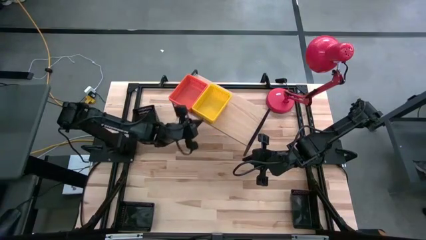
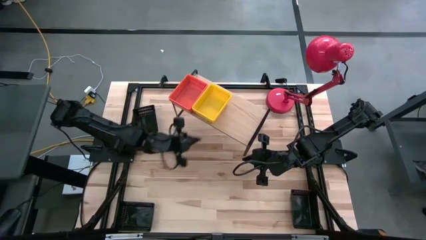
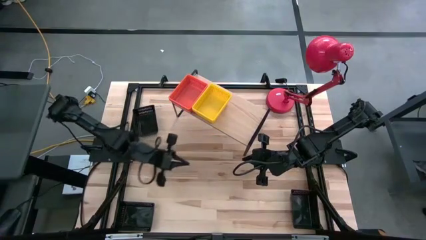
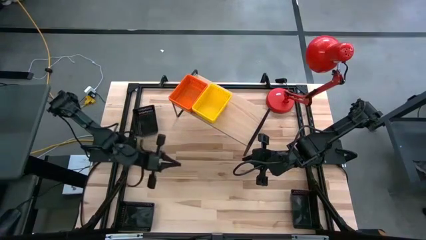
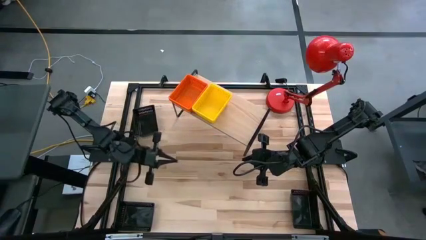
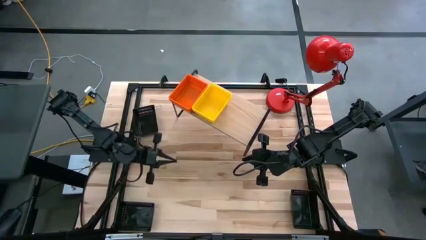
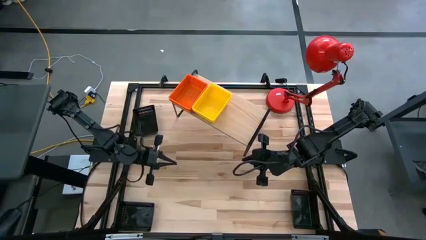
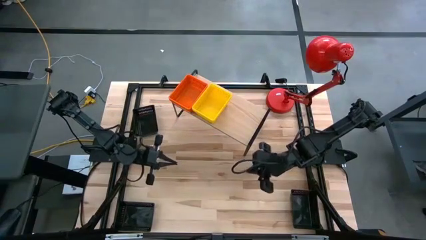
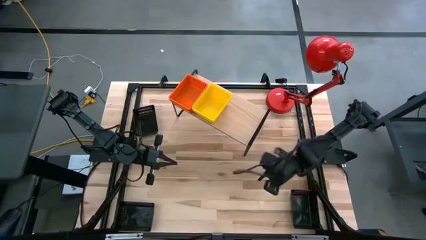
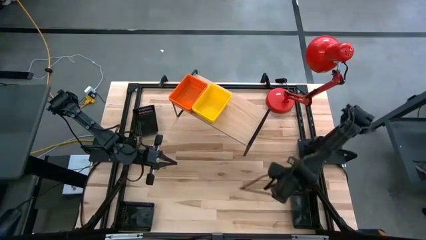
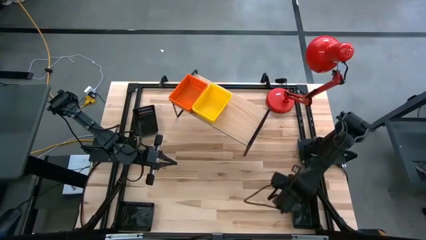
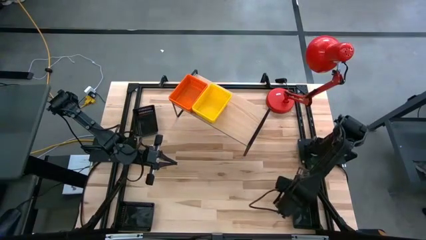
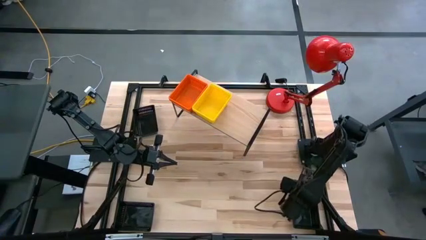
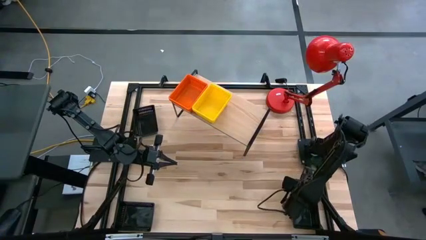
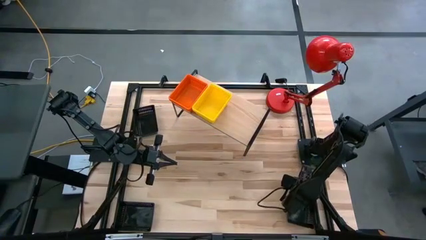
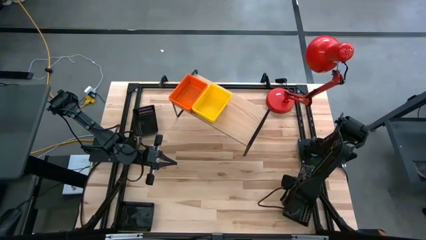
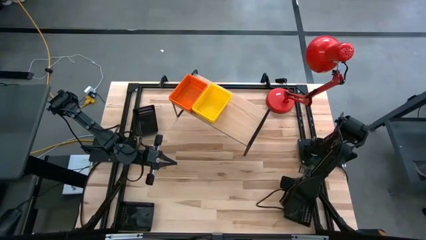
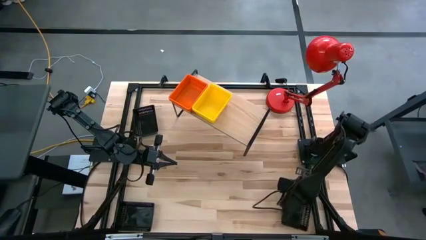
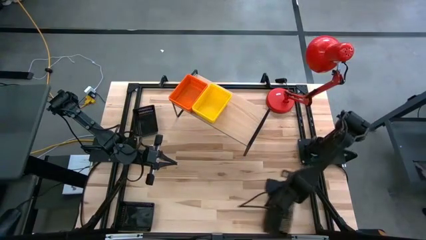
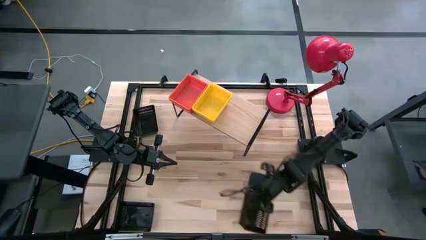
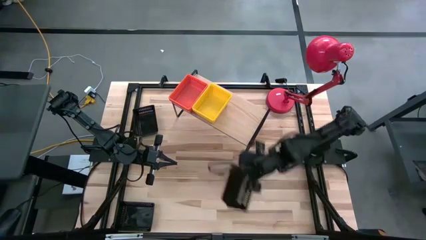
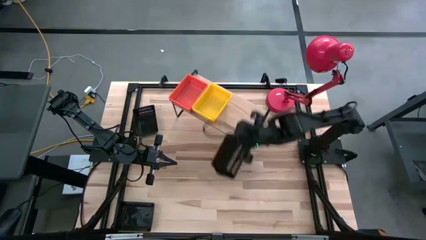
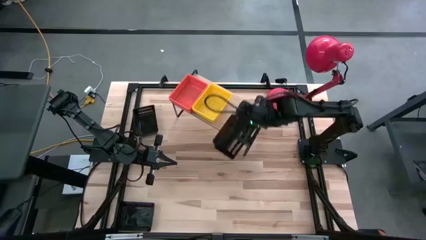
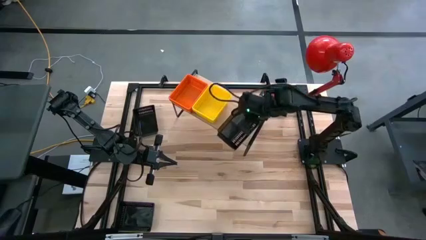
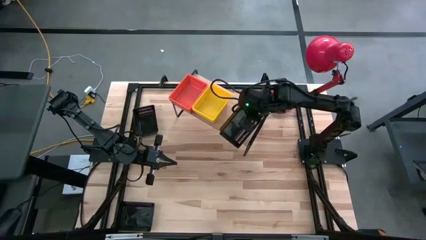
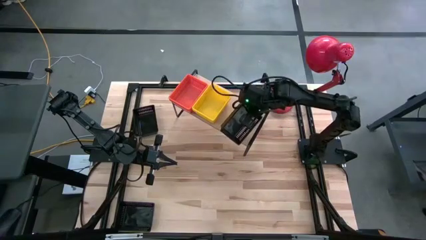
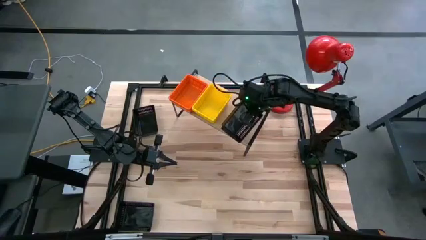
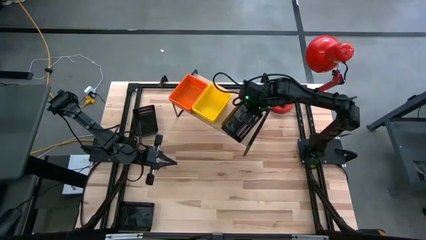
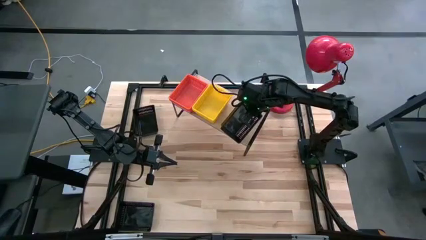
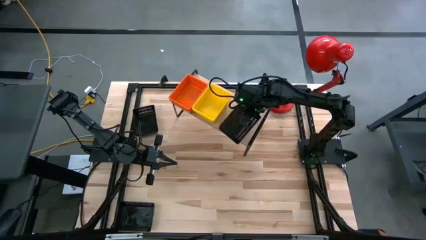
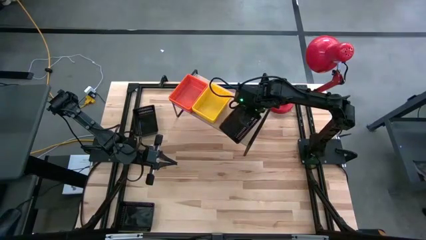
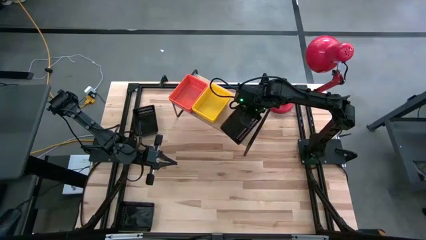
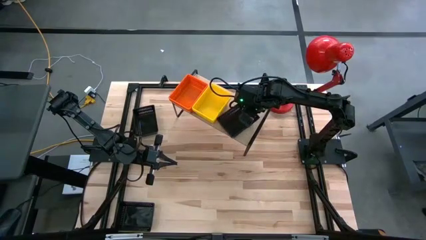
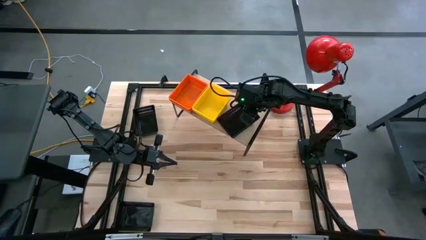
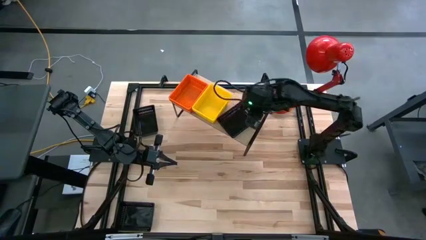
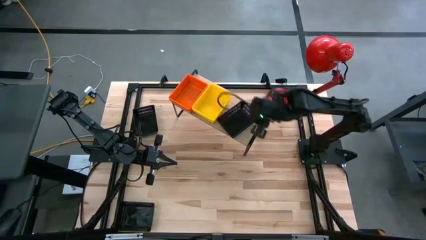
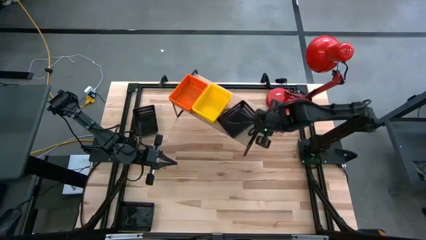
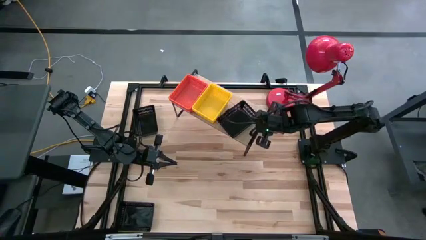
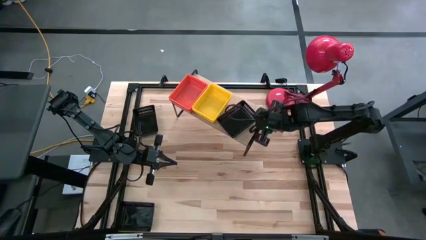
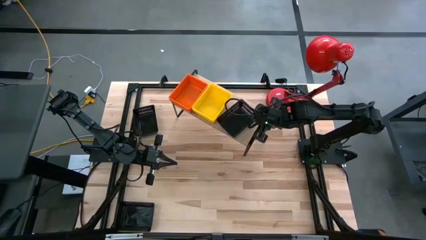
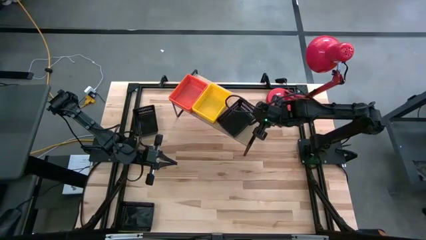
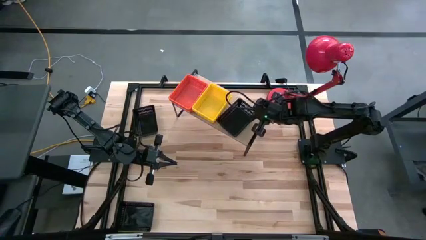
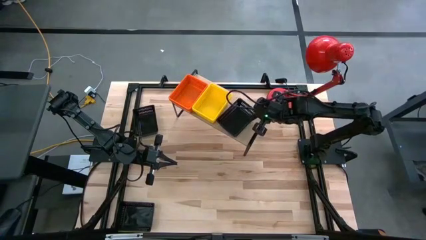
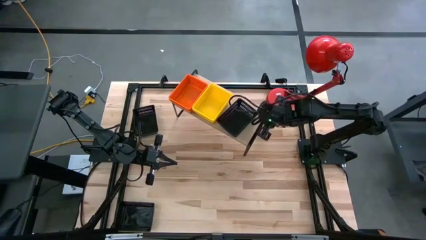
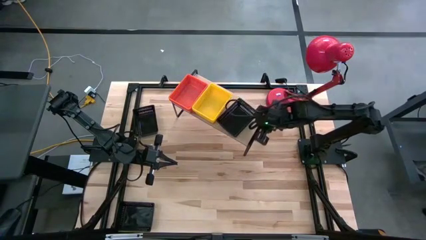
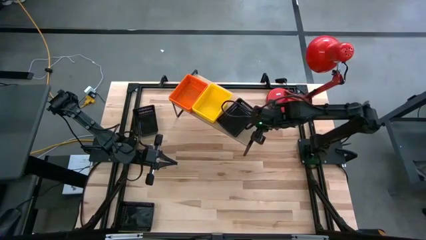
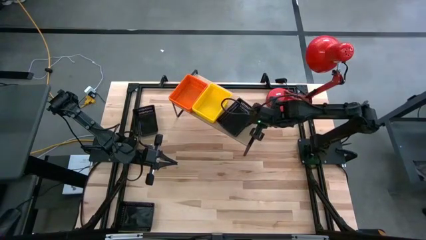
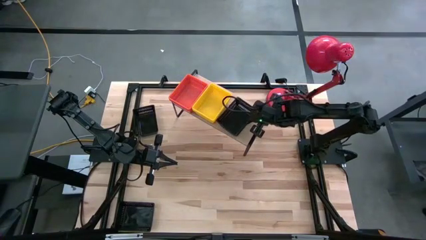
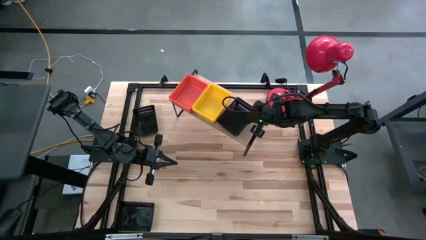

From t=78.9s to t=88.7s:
Task: Stack baskets on shelf by color
Put the bottom right black bin on the shelf

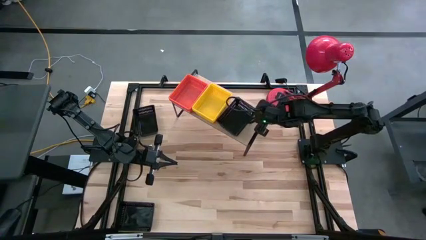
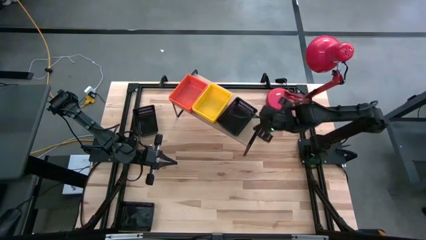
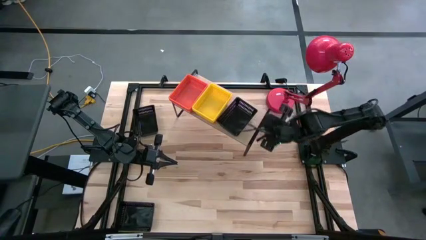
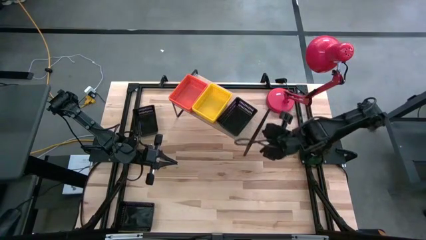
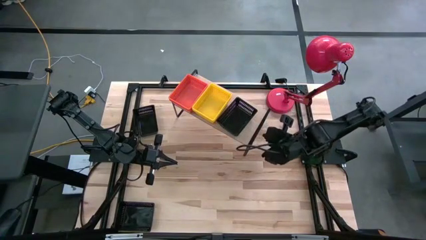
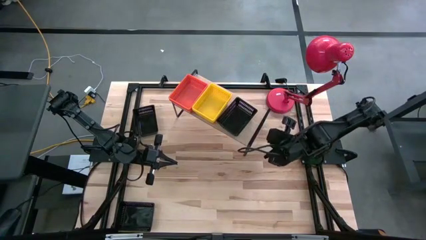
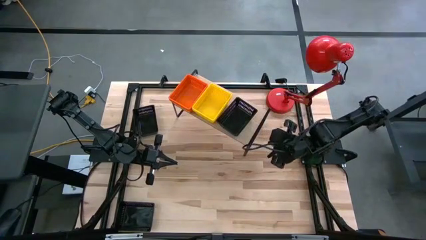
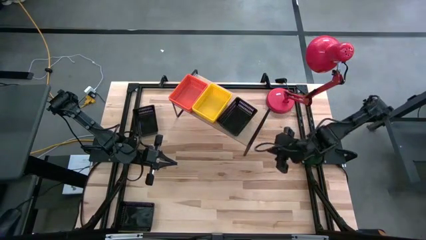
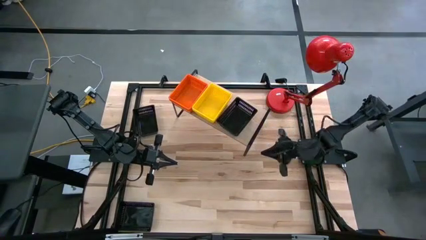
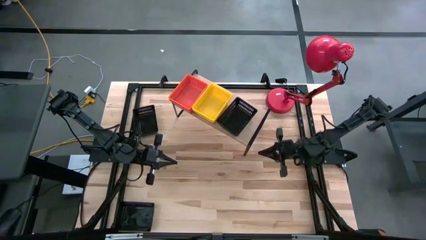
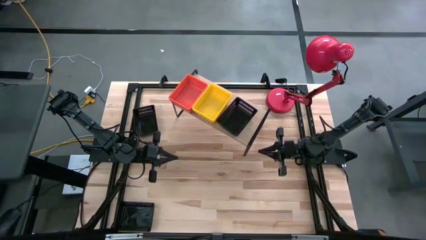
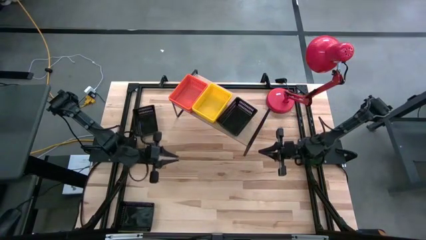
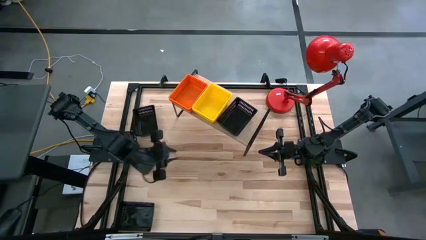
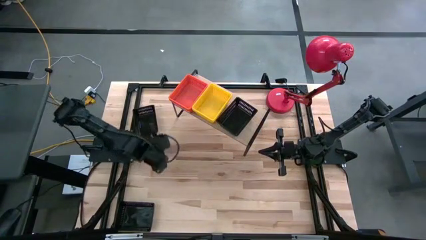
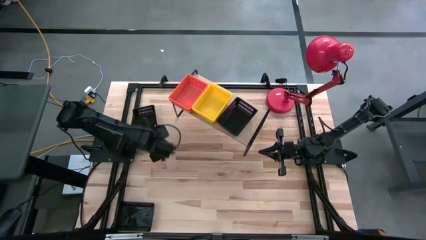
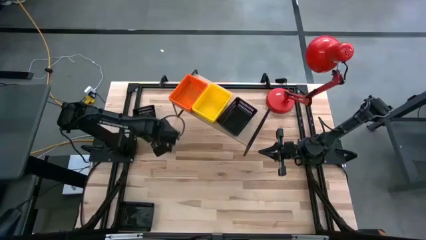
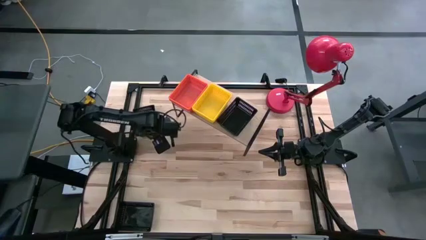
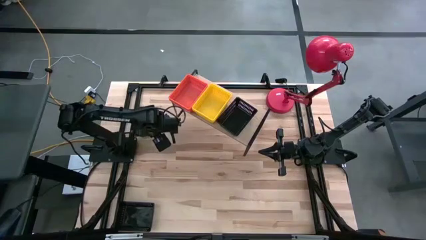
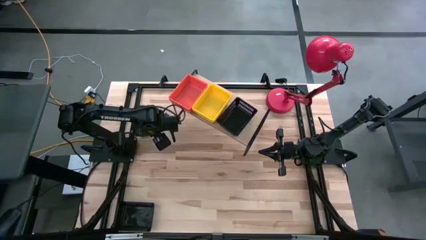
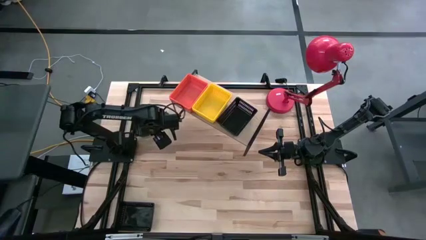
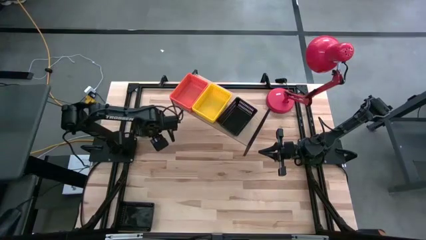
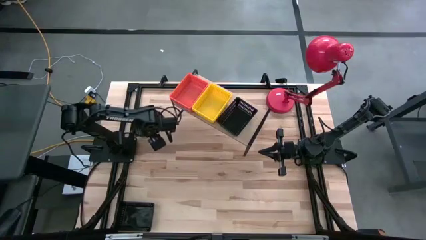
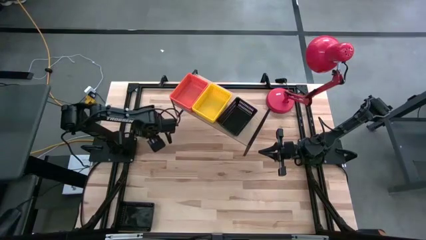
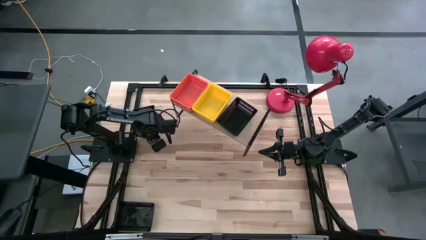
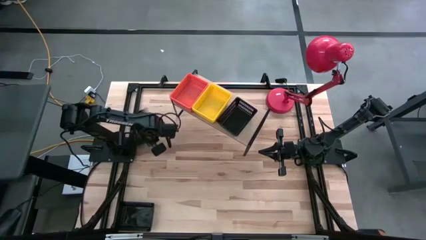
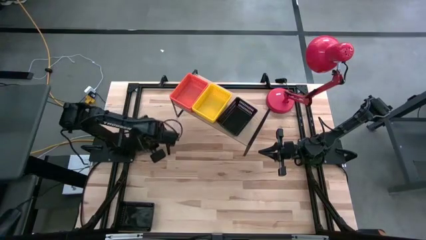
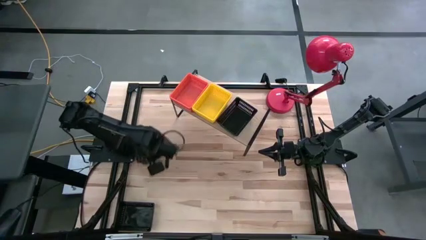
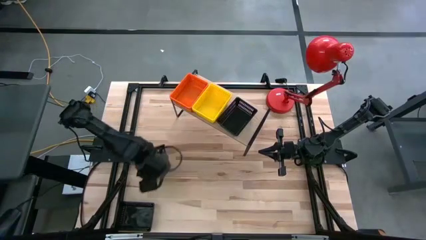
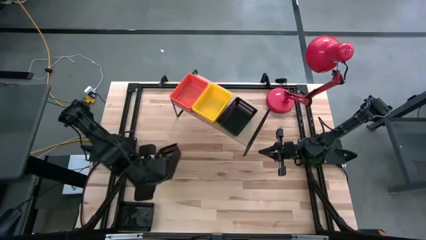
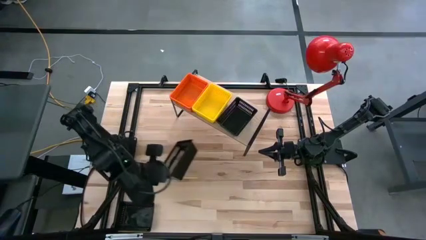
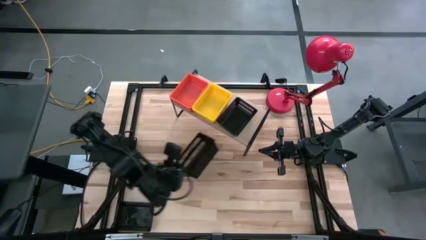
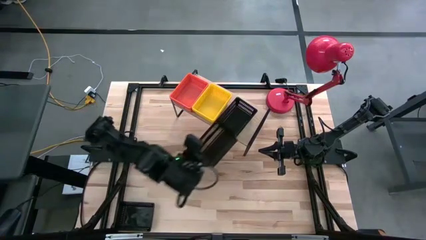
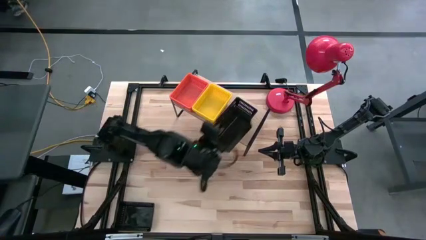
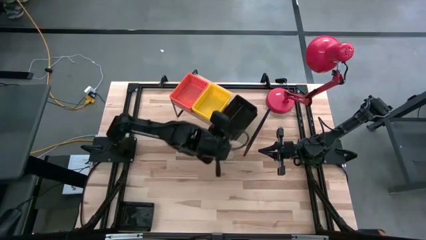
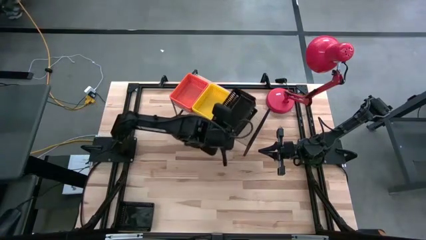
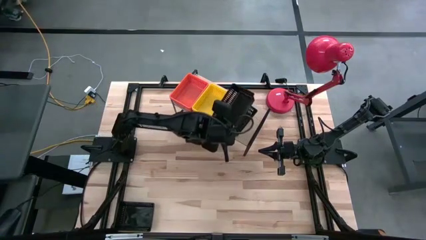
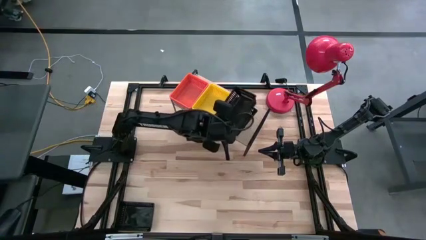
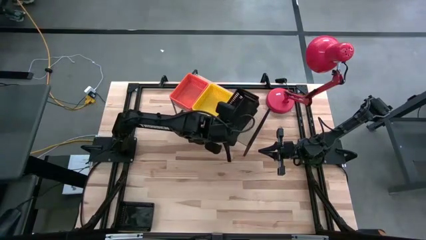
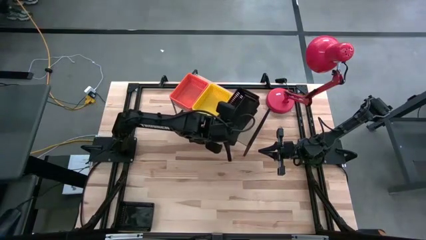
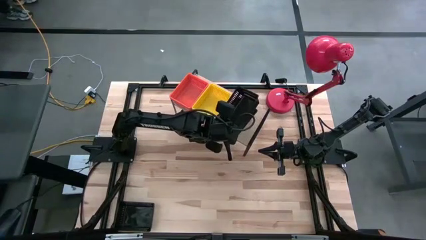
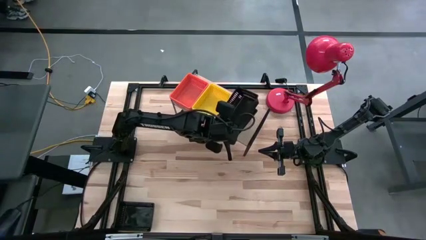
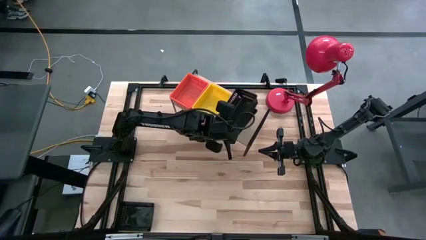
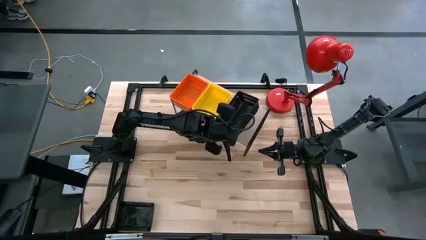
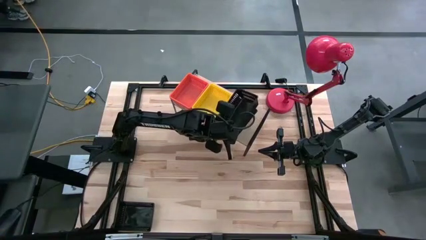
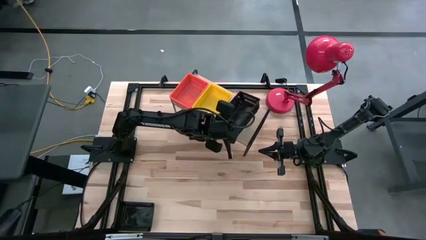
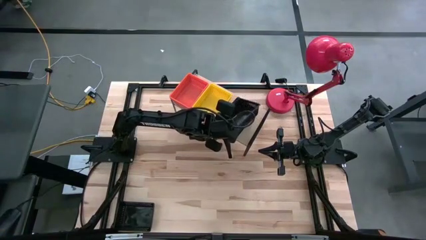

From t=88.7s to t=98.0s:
Stack the top black bin on top of the black bin on the shelf
